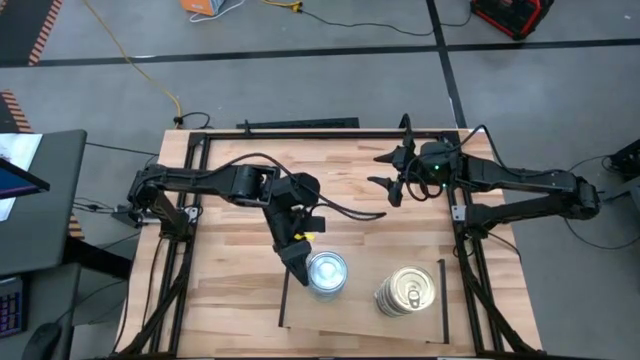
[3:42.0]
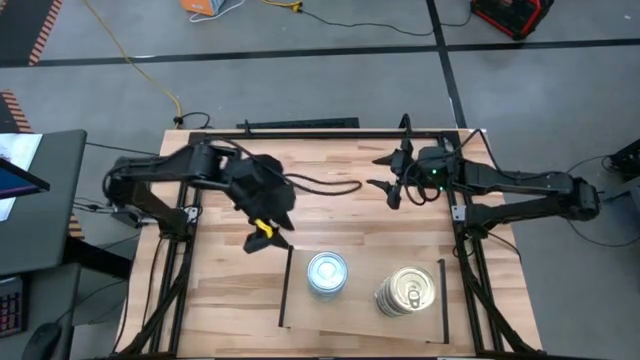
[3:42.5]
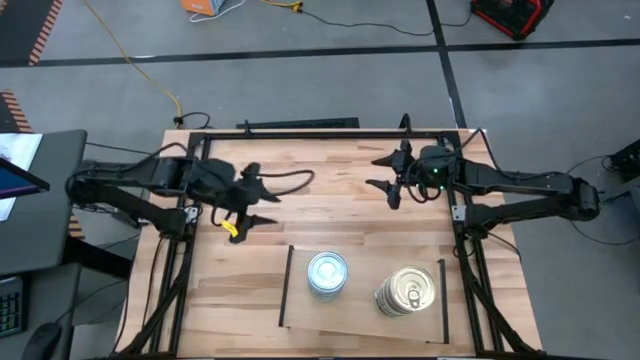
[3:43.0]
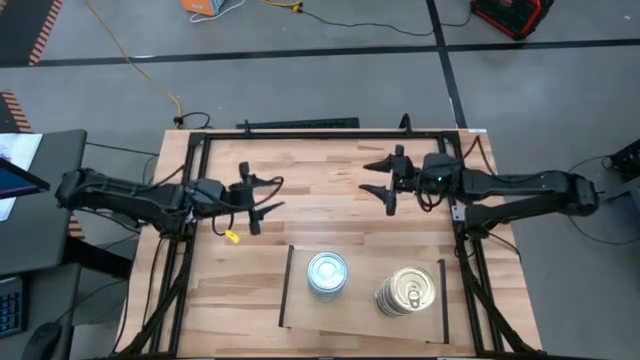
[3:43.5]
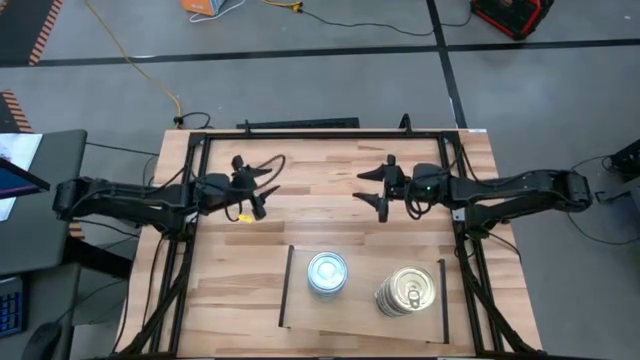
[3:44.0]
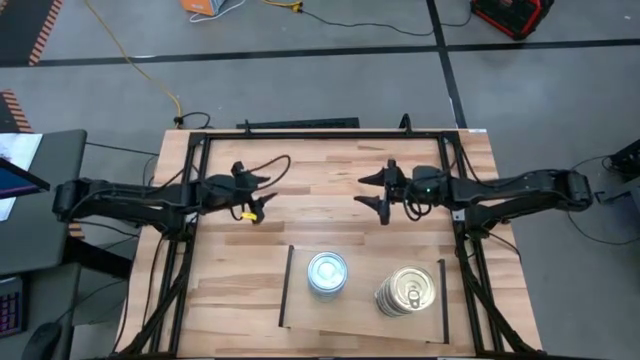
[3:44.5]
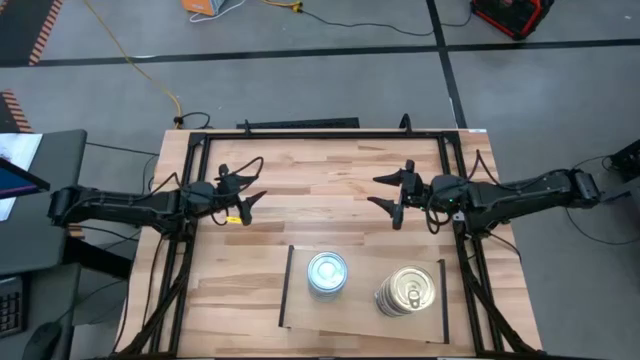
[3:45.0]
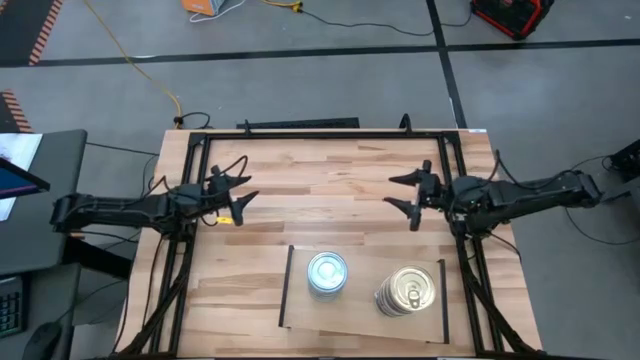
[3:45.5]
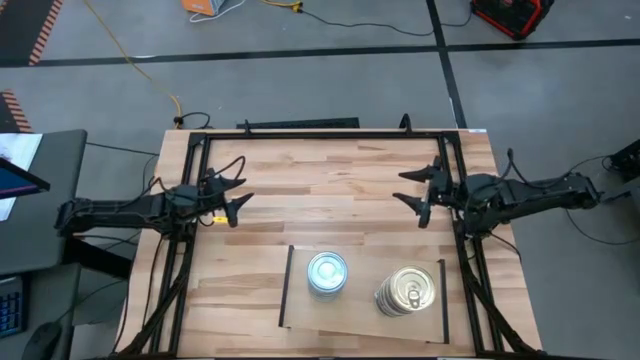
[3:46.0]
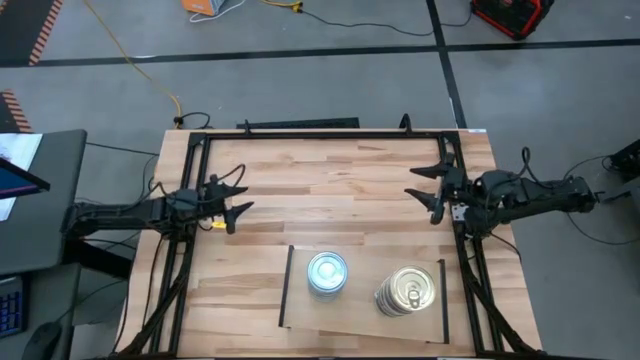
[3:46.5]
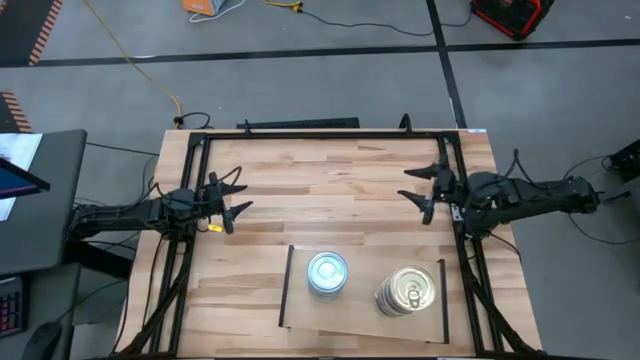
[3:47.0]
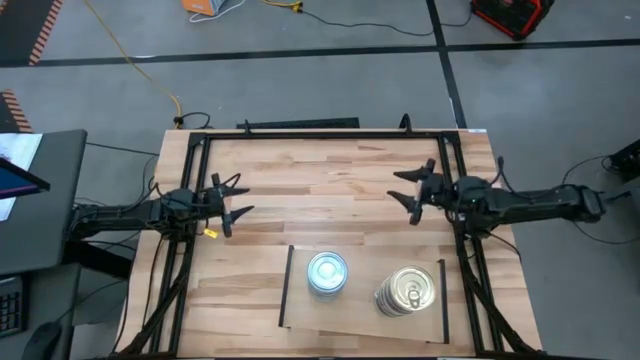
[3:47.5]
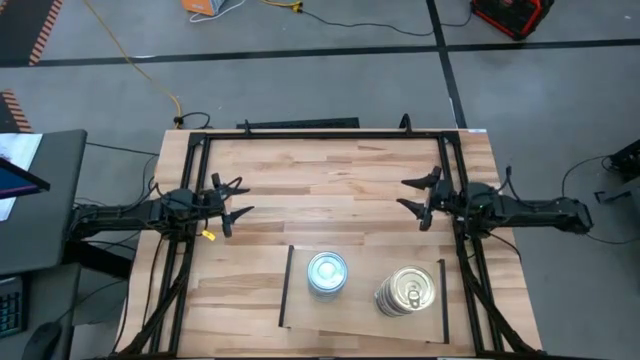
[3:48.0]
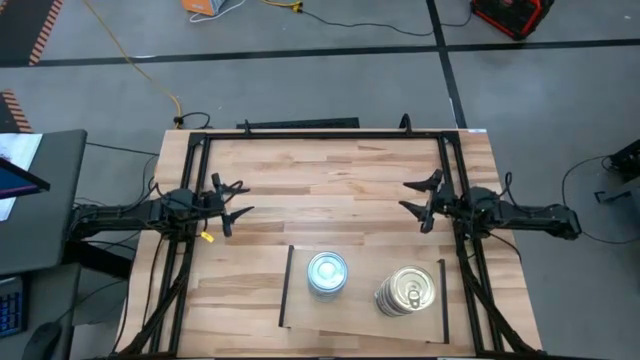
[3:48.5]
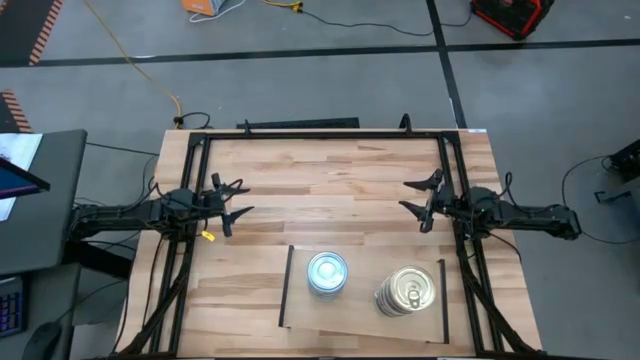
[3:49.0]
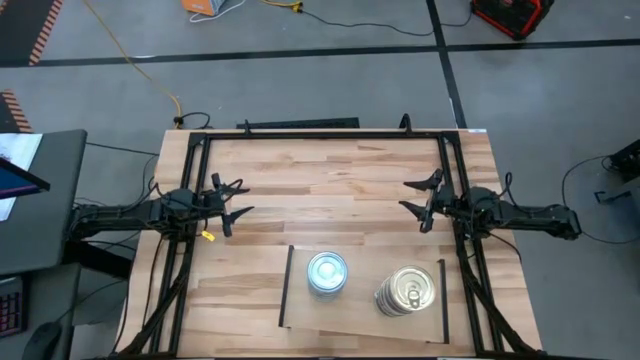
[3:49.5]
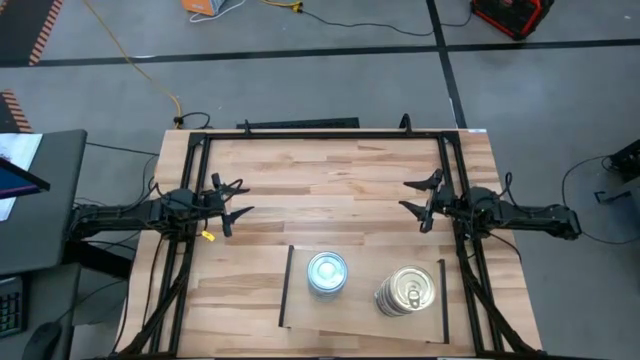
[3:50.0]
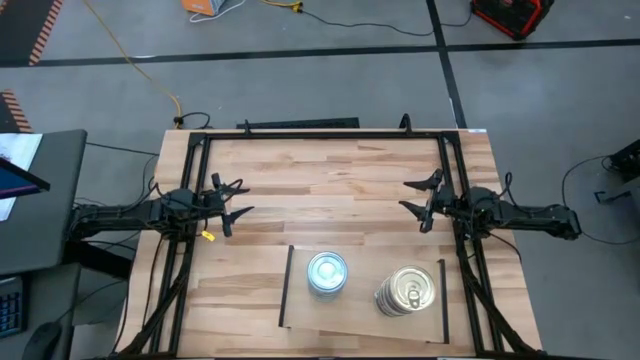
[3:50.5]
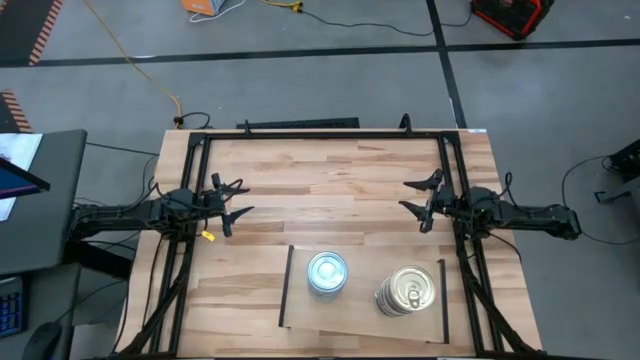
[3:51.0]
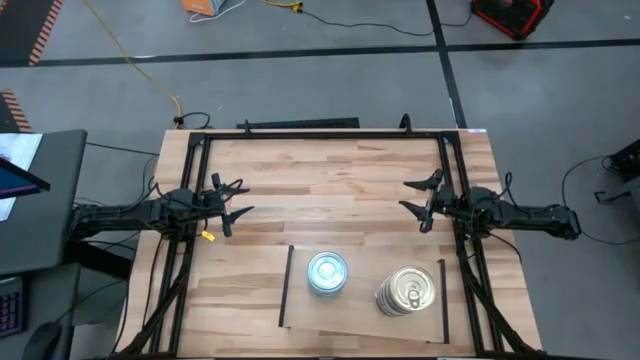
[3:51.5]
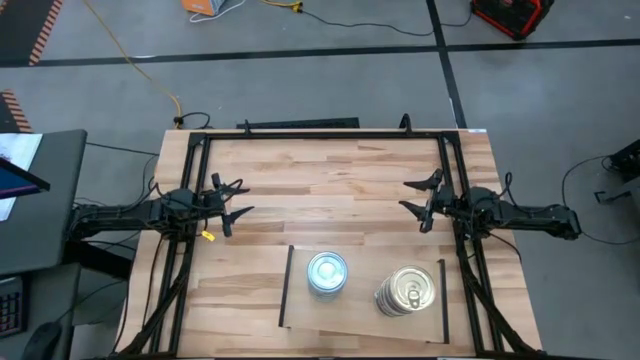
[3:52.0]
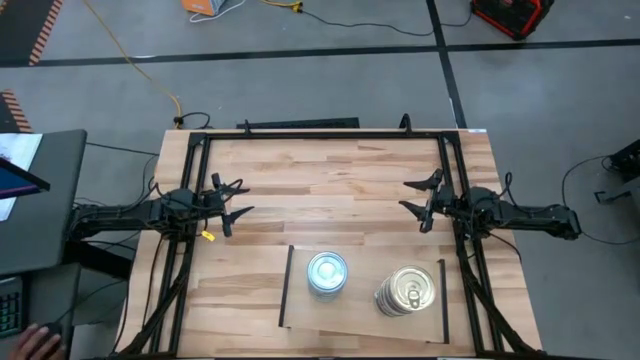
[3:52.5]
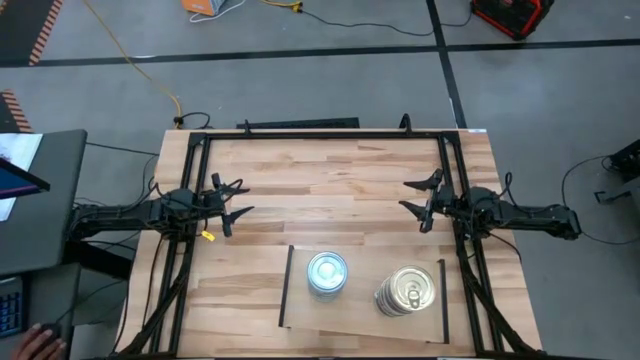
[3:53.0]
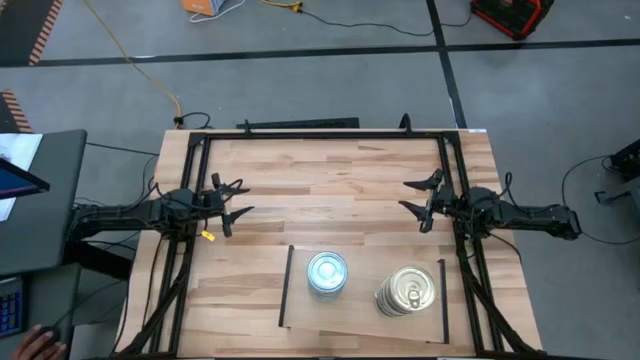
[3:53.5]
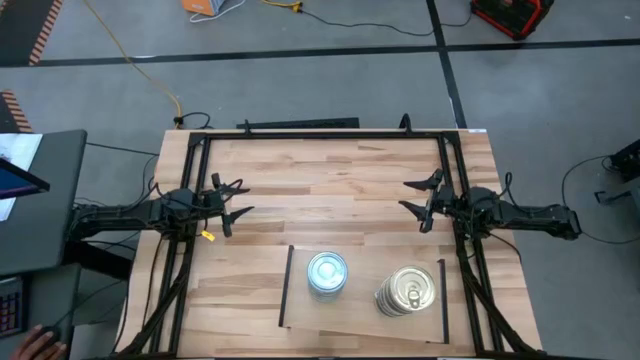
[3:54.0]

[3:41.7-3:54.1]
Task: Stack canned seafood by type on shelf
Return to Home Position

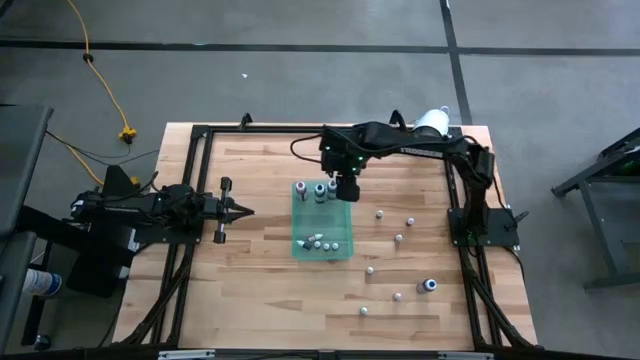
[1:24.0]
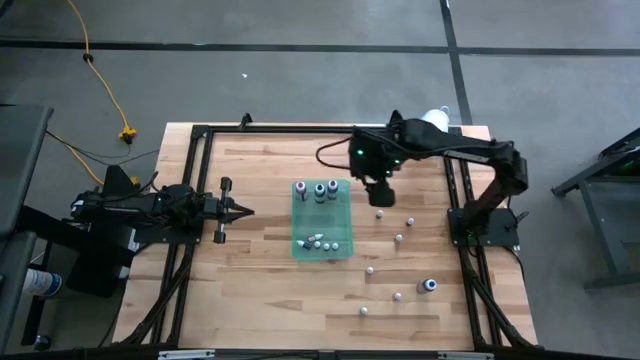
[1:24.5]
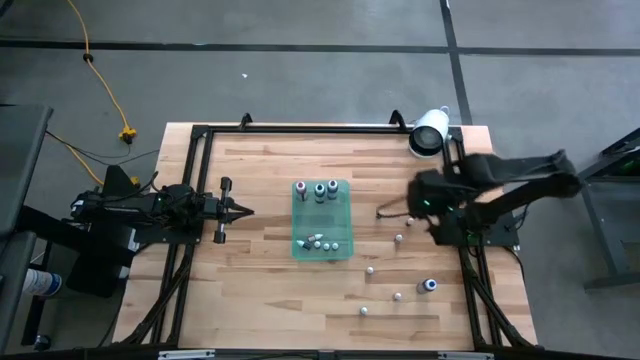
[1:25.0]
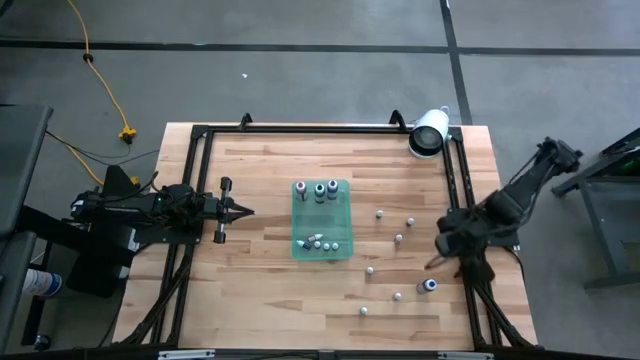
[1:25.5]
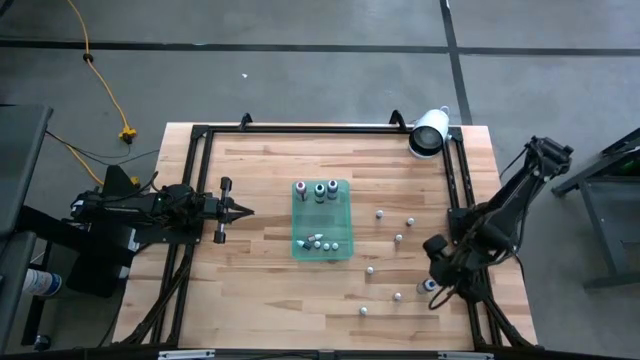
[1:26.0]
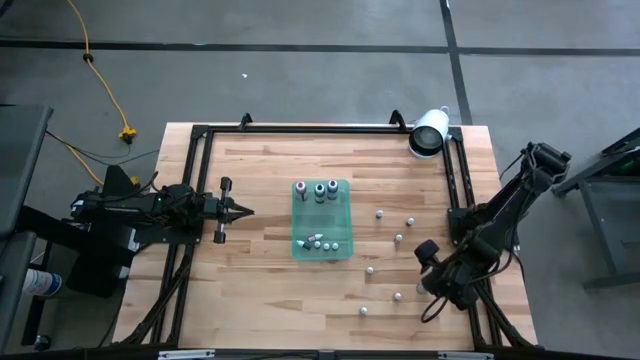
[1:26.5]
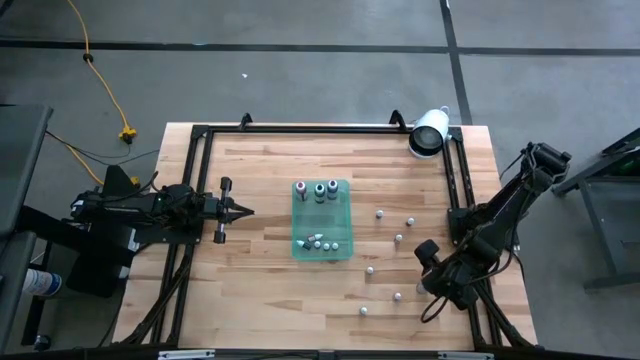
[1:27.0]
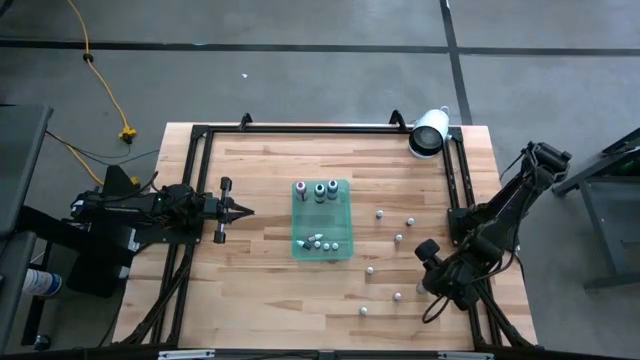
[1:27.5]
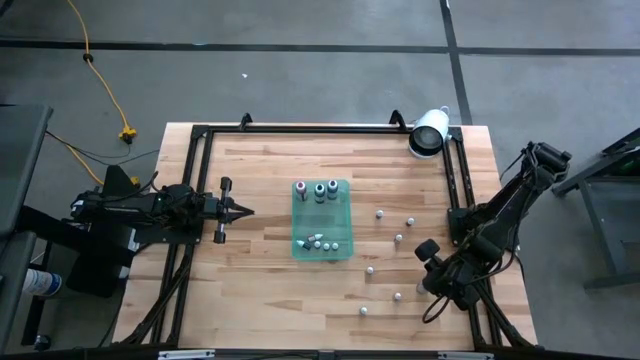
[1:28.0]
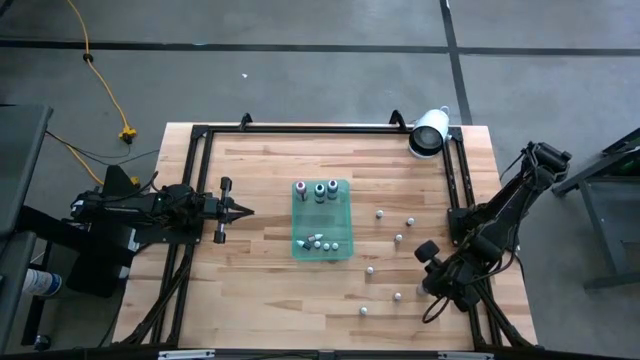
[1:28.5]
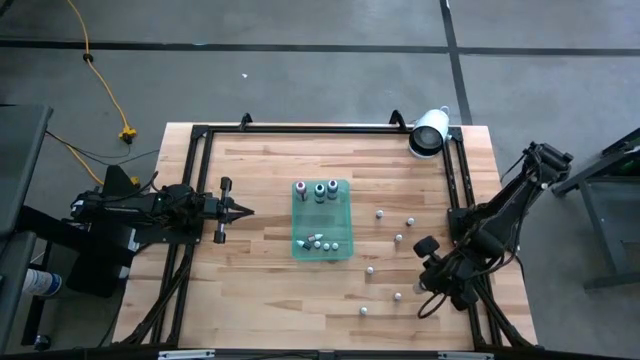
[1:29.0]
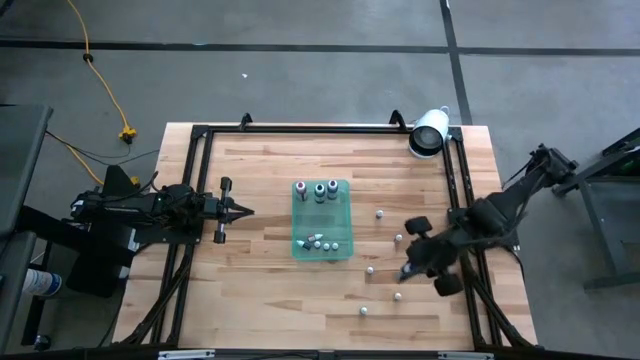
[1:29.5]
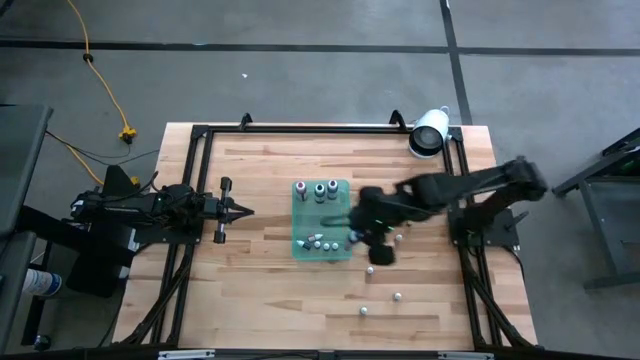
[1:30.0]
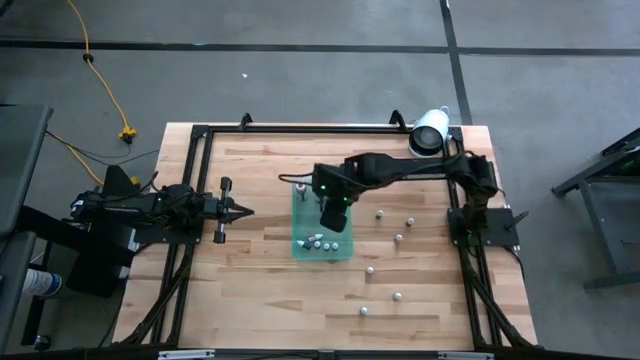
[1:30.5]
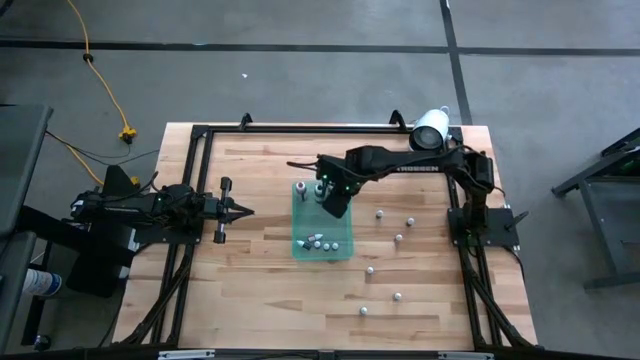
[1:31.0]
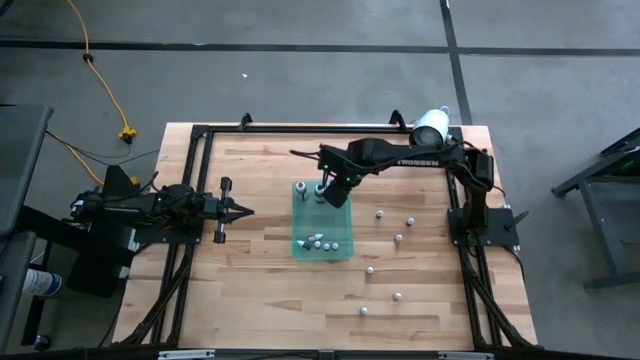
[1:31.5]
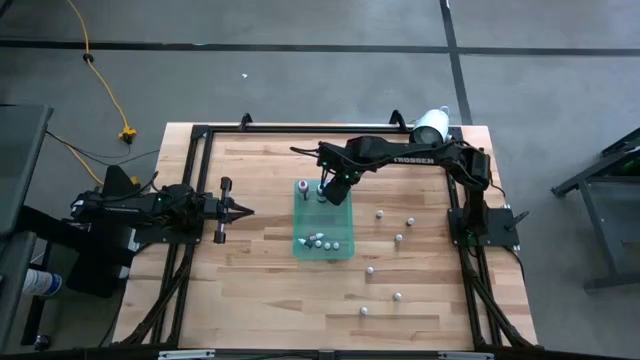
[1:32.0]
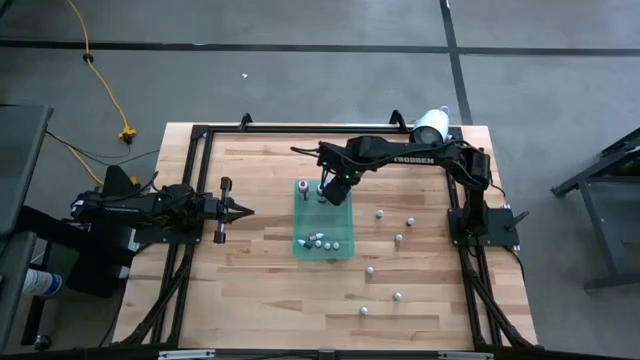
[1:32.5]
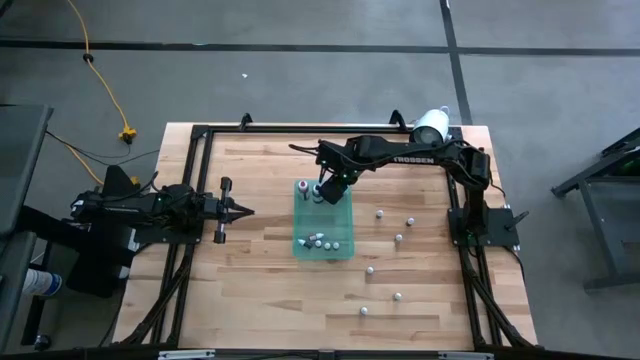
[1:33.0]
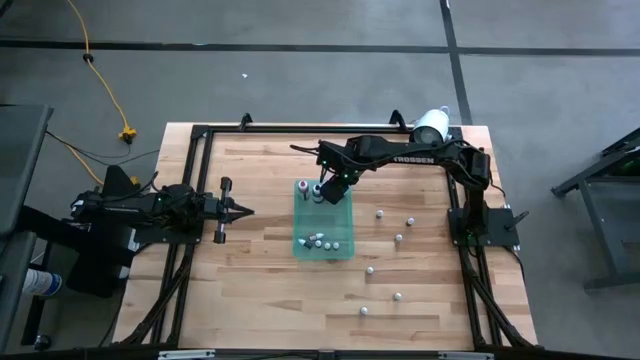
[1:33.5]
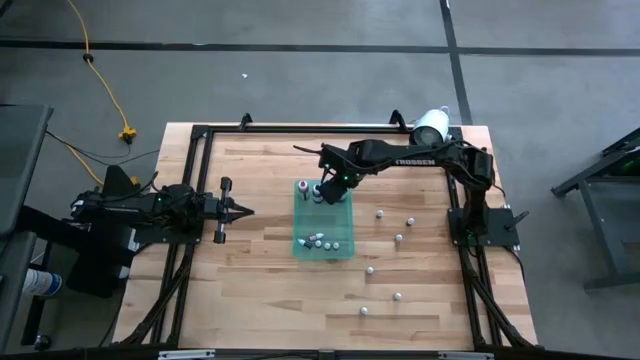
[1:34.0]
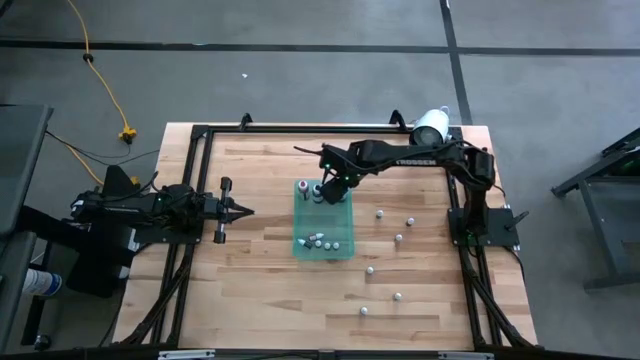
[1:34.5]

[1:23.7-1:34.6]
Task: Pick & Place food coloring
Put the big blue food coloring bottle into the green bin
